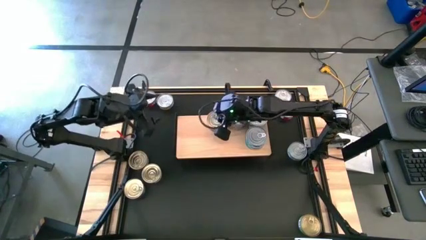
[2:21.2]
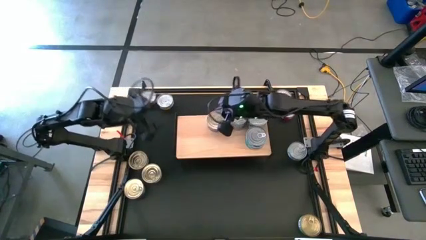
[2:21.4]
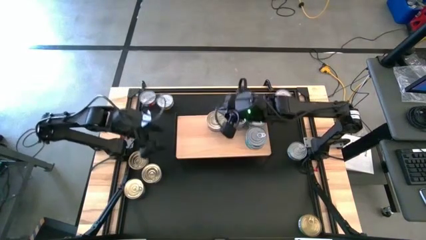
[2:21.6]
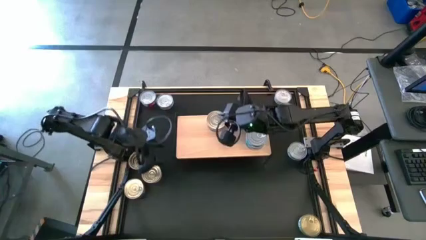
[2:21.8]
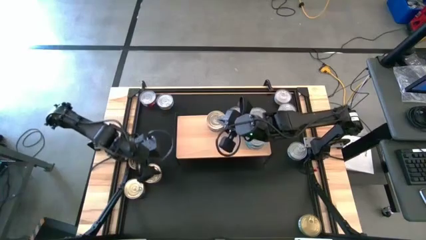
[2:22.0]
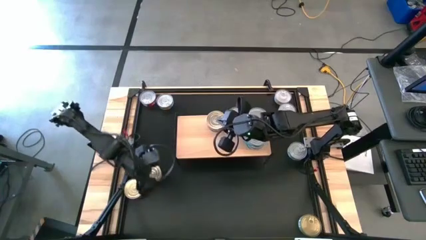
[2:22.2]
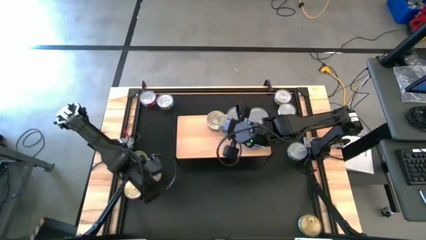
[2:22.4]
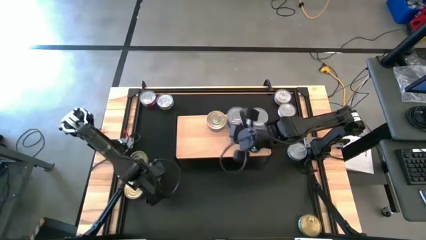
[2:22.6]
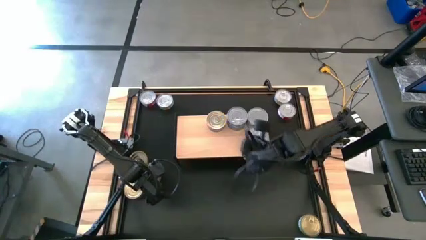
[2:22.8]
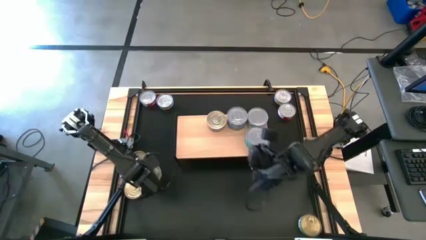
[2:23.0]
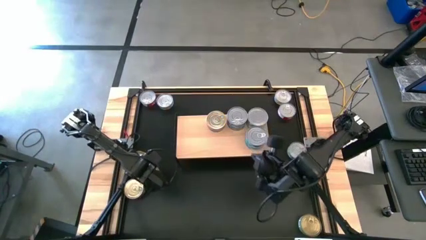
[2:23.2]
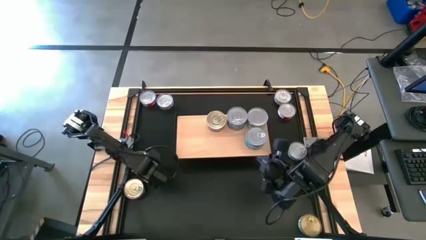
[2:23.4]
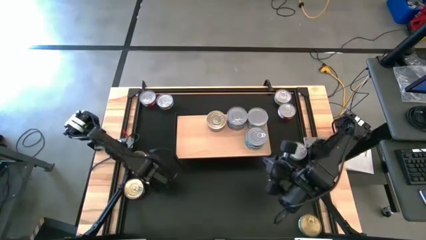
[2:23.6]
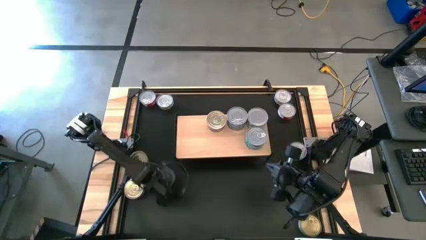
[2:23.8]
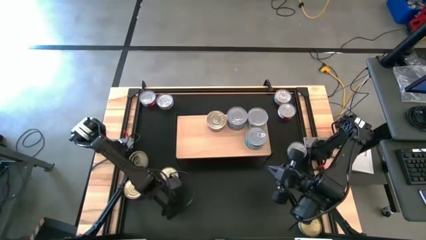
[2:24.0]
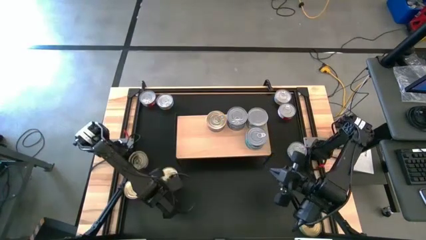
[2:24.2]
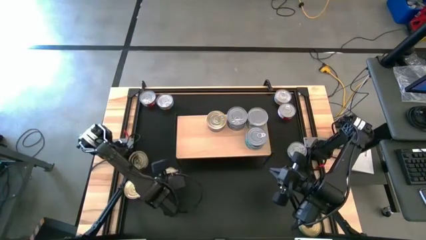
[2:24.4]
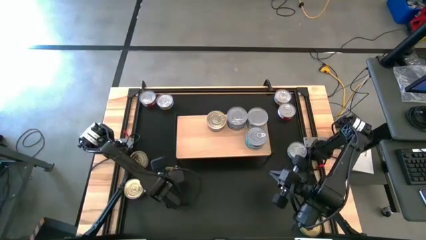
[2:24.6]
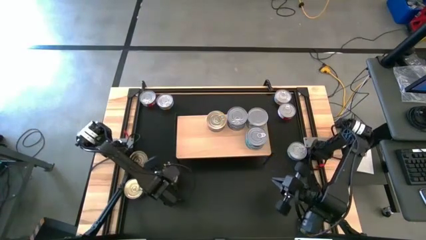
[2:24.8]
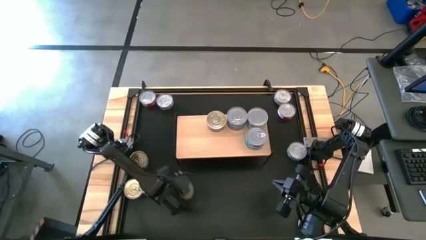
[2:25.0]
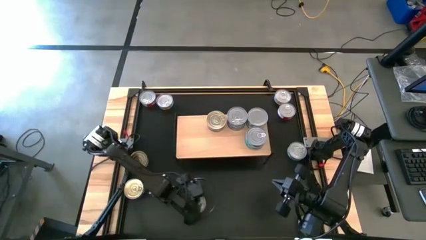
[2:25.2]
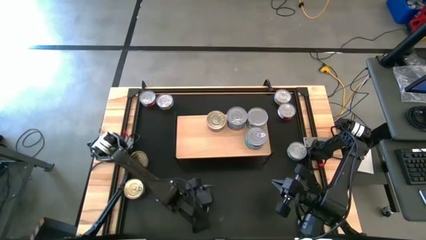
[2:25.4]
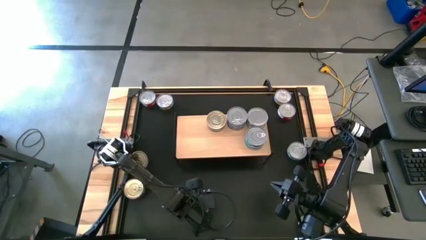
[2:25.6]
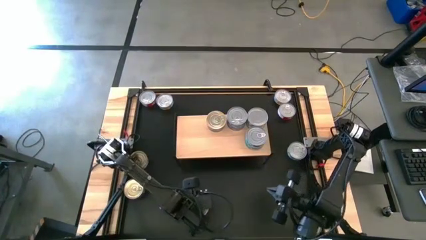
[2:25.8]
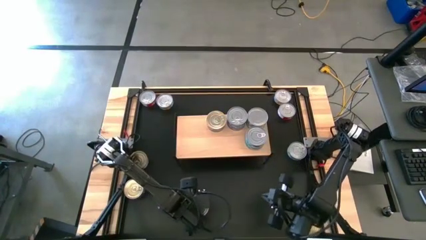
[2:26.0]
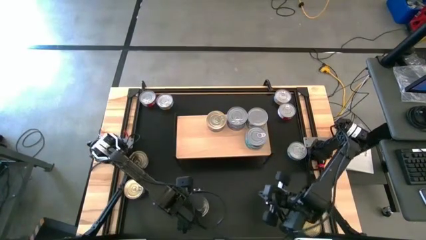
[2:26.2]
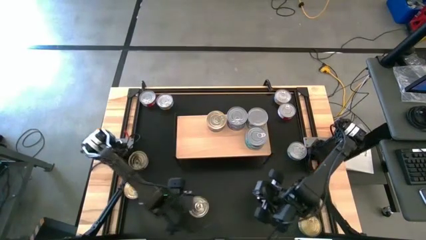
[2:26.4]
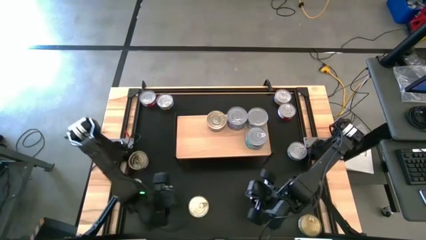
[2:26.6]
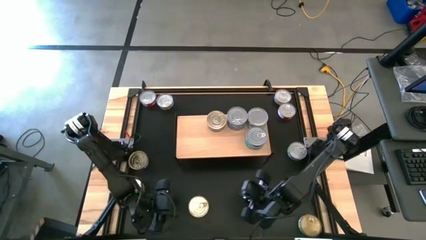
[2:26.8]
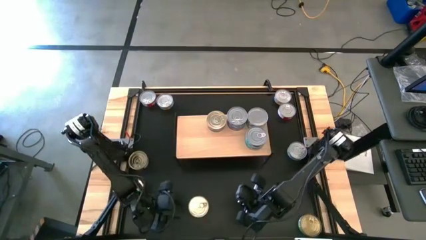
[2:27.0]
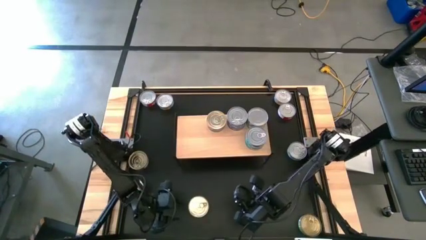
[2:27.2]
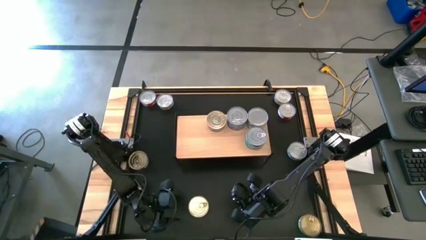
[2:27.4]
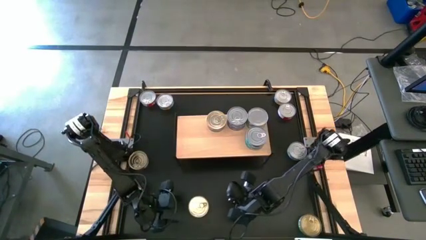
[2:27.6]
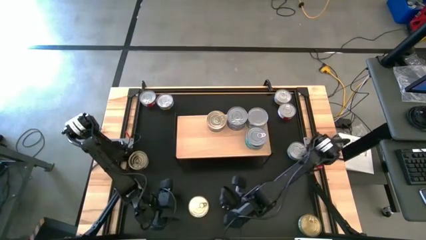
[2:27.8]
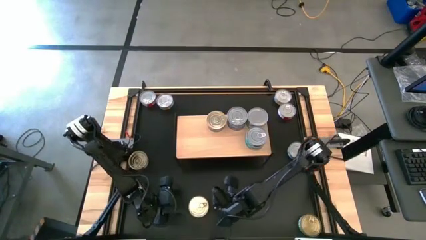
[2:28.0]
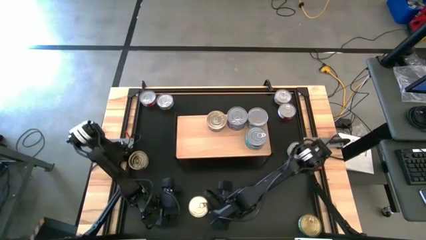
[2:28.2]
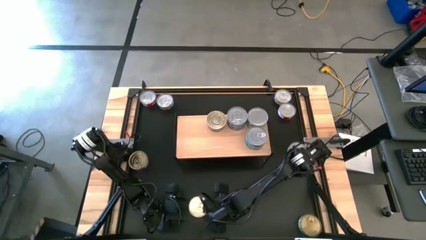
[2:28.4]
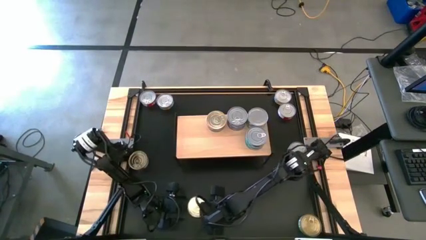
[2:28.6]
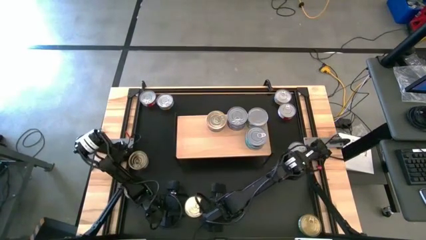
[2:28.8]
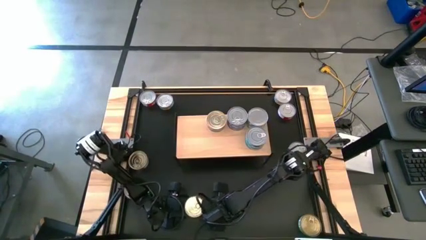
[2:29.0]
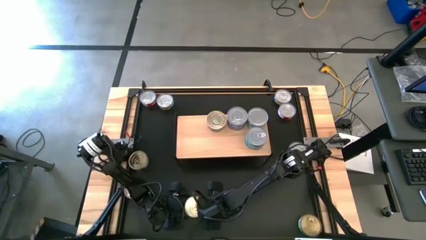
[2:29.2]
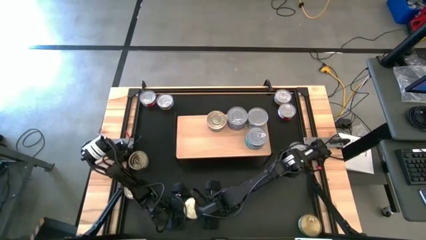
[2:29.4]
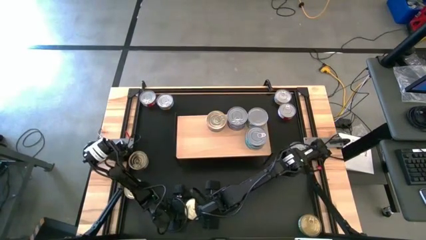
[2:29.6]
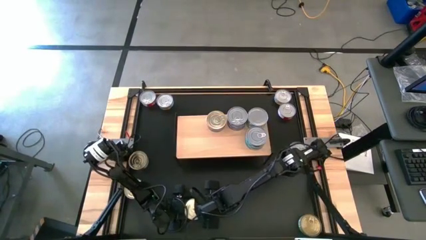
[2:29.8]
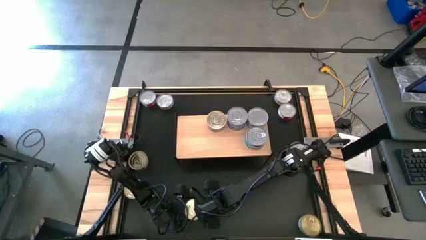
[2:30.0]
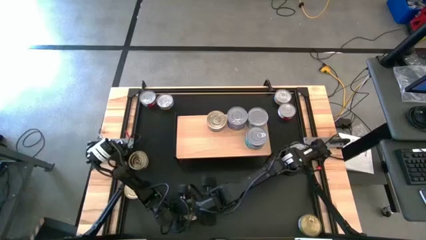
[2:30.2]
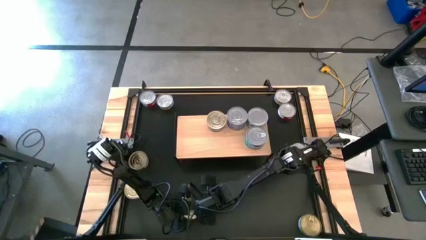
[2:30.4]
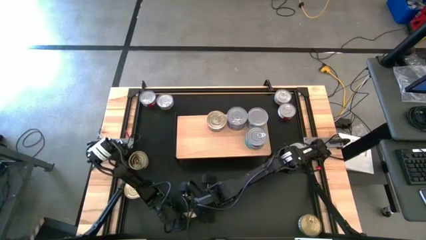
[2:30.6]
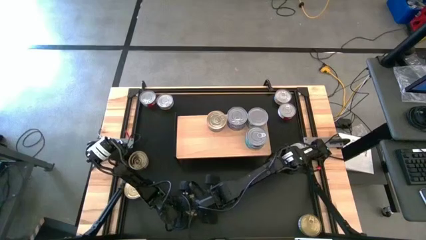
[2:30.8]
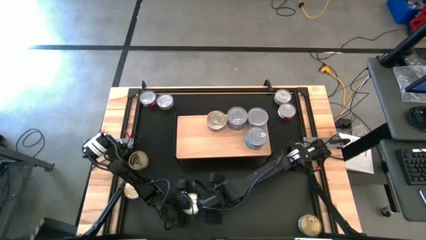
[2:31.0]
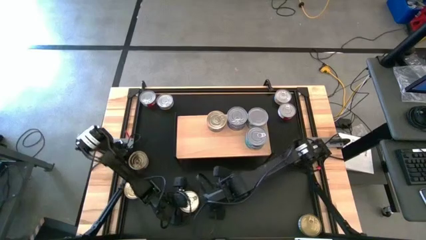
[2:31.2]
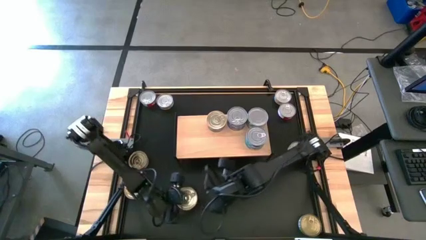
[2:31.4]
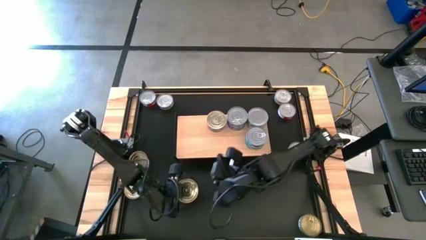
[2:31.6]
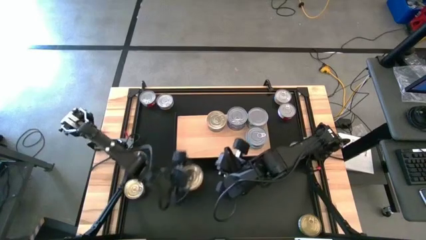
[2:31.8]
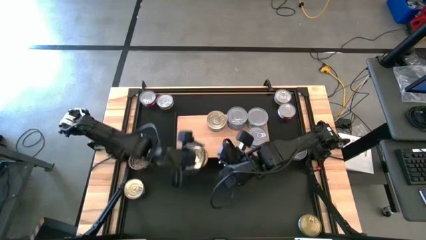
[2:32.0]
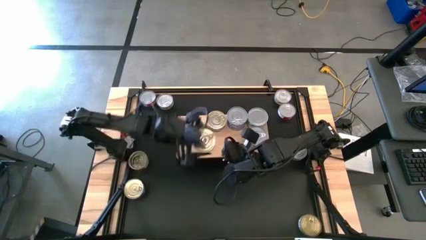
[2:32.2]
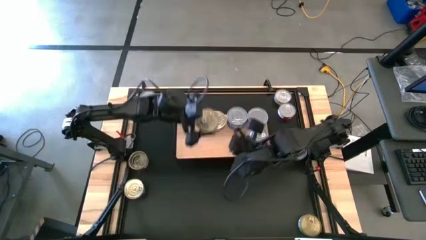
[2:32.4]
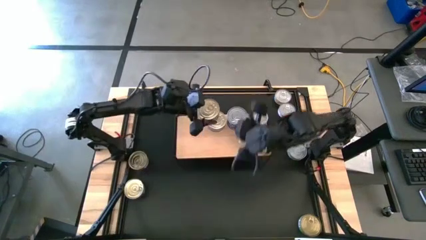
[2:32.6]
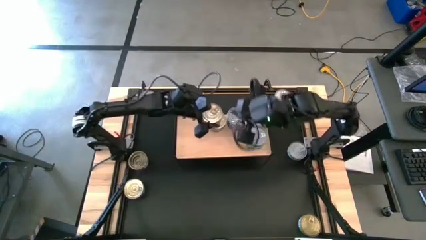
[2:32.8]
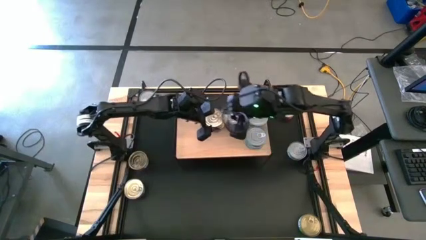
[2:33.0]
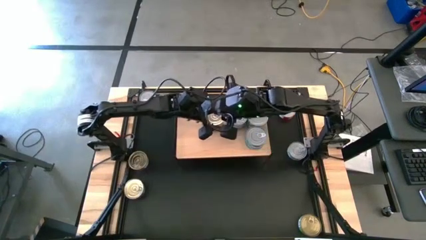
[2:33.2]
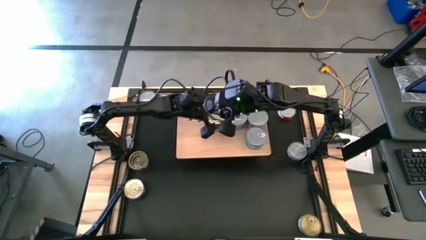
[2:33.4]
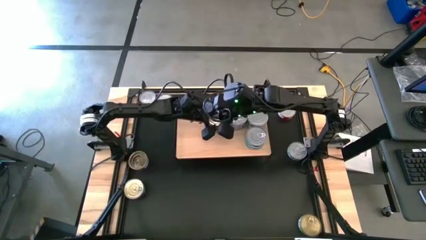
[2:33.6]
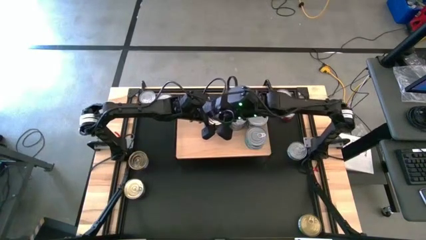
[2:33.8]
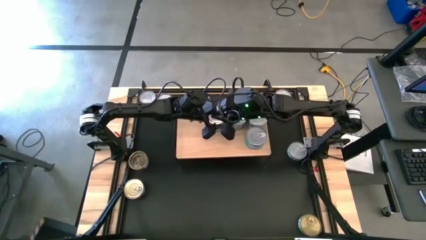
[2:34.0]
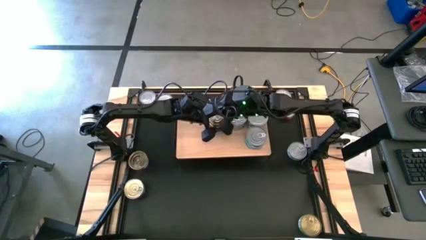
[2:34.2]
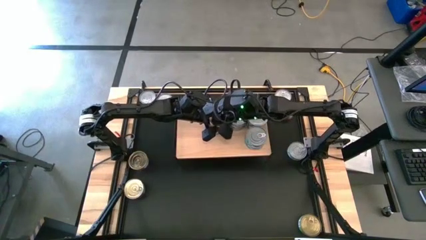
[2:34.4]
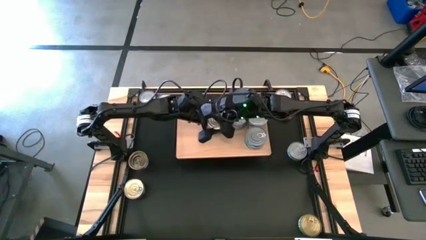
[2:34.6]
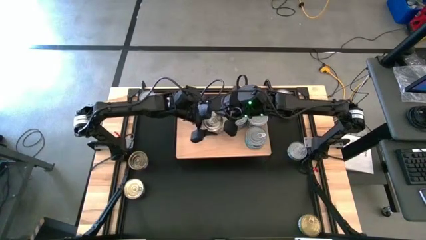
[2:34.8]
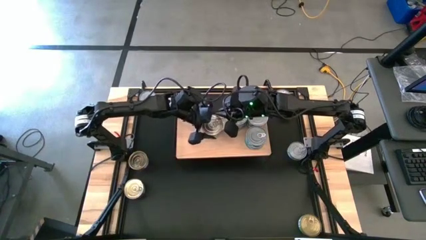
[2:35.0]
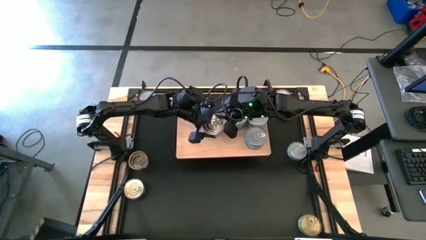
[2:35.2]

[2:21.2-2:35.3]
Task: Stack canned seafood by type on shelf
Stack the blue pink tuna can on top of the blue pink tuna can on the shelf

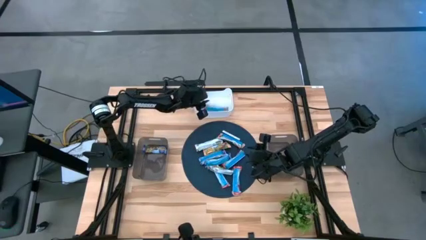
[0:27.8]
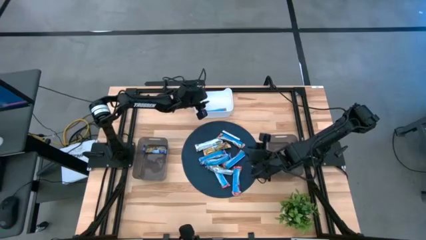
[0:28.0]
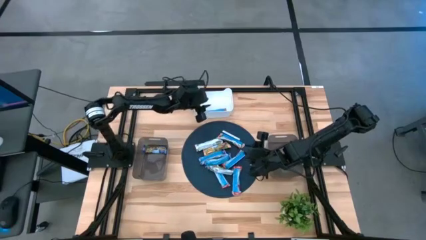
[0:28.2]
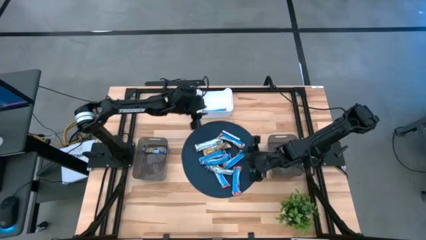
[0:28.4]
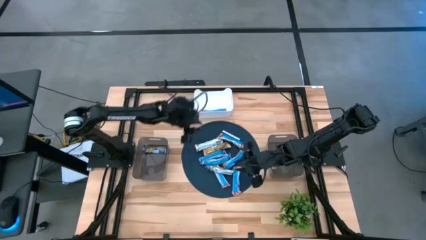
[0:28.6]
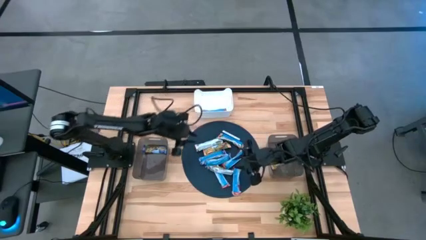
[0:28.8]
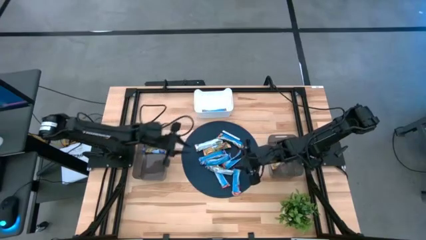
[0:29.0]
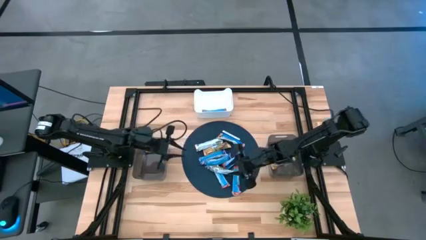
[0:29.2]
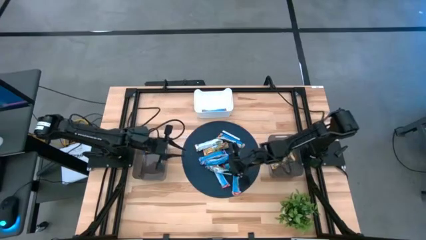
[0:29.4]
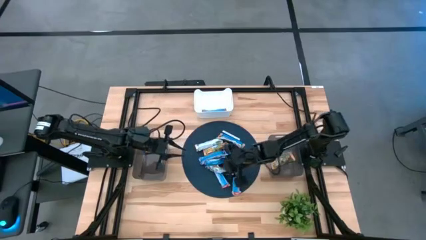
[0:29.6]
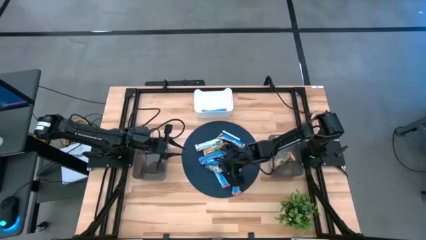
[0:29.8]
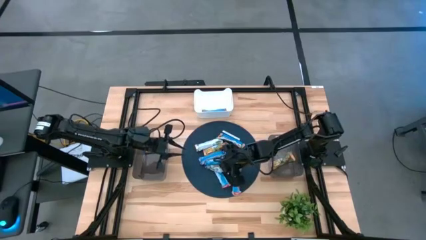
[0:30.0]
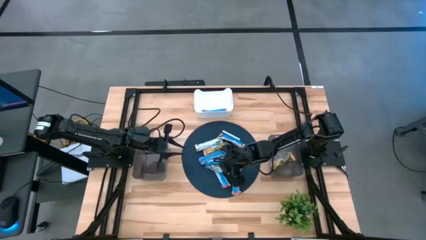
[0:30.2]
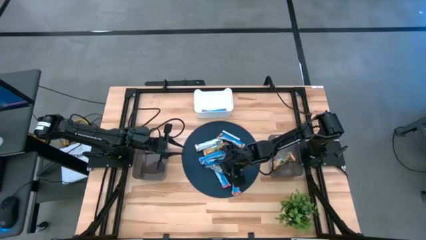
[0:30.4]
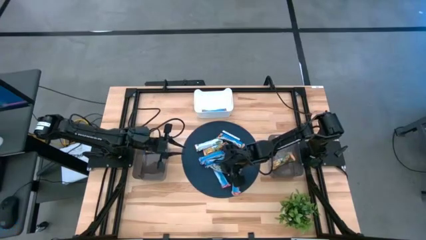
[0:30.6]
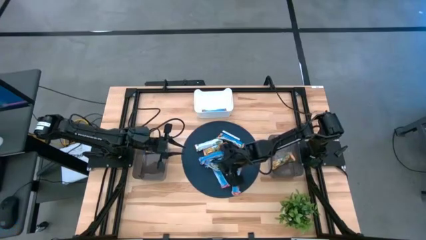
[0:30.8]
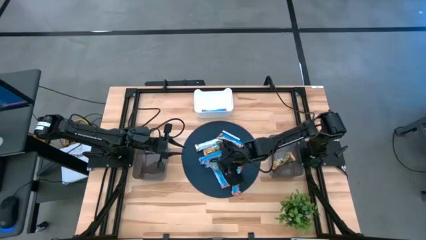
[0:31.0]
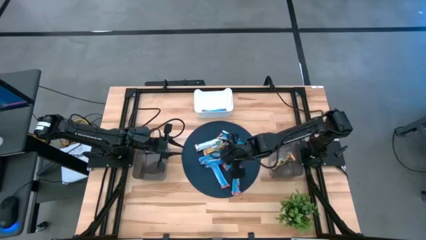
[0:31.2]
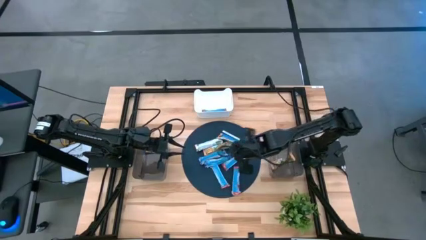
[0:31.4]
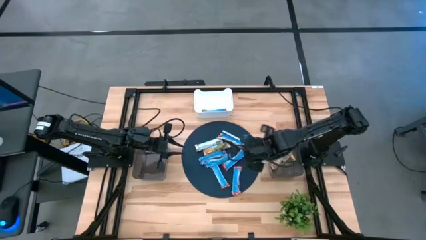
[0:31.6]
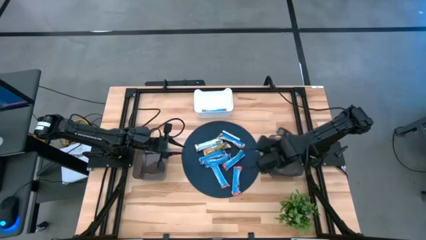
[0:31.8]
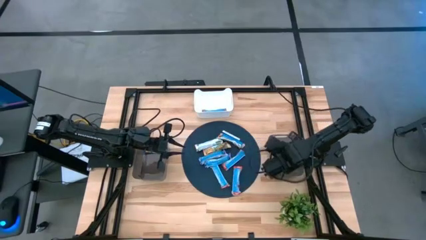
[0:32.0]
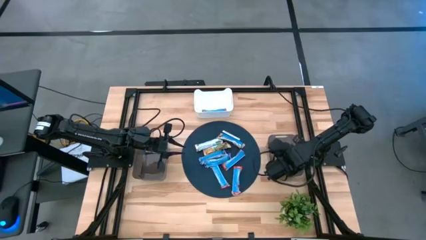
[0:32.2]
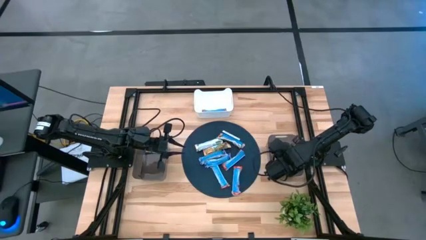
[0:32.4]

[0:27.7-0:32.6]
Task: Pick and place Granola Bars by type
Put the orange granola bar into the right black bin
